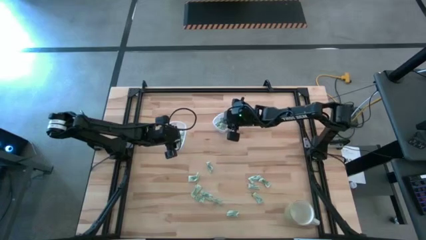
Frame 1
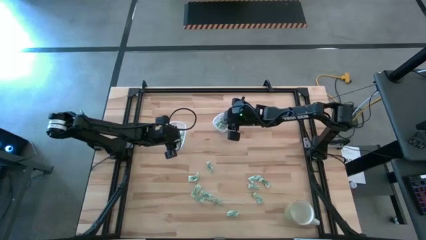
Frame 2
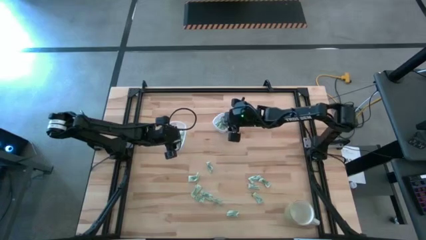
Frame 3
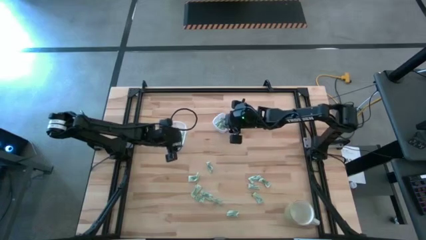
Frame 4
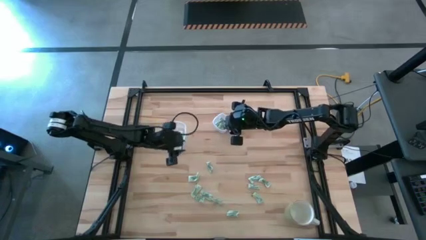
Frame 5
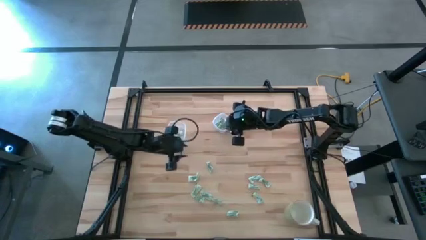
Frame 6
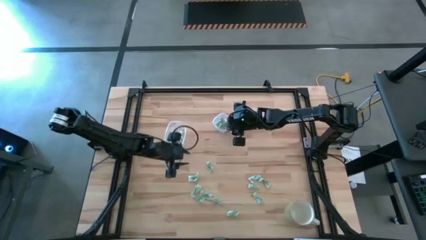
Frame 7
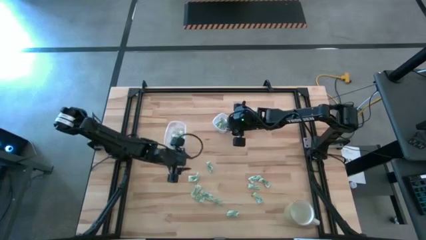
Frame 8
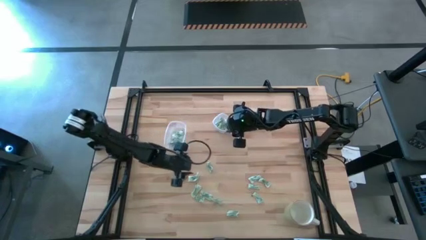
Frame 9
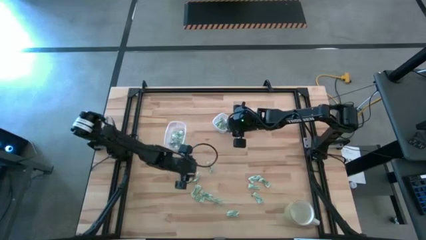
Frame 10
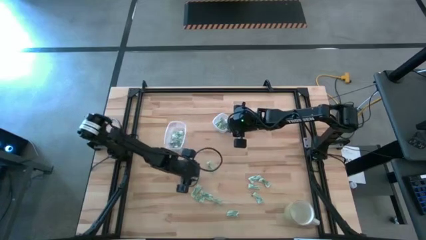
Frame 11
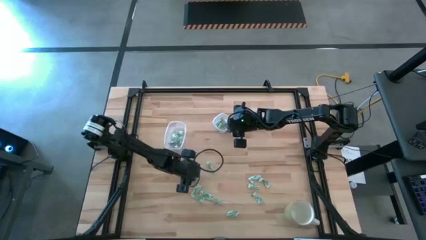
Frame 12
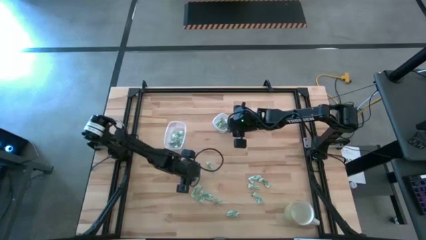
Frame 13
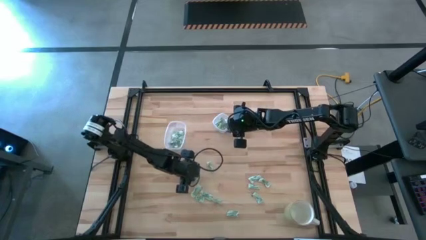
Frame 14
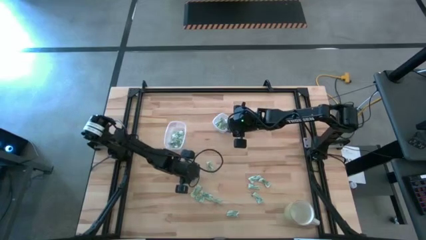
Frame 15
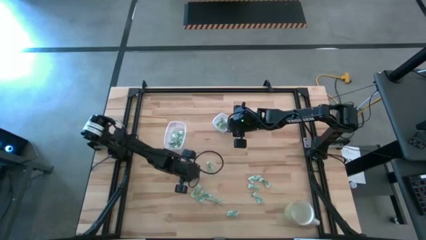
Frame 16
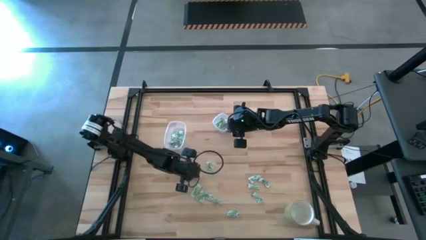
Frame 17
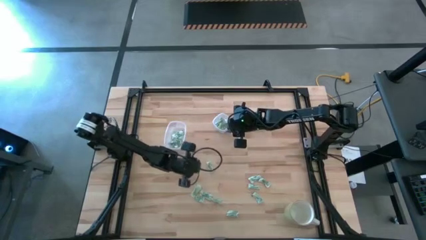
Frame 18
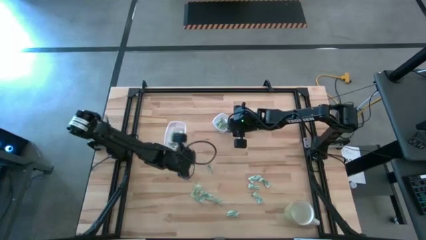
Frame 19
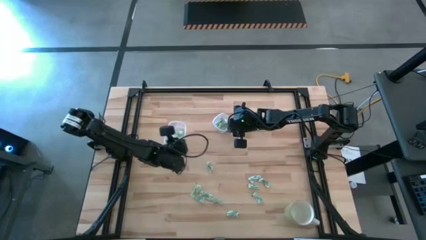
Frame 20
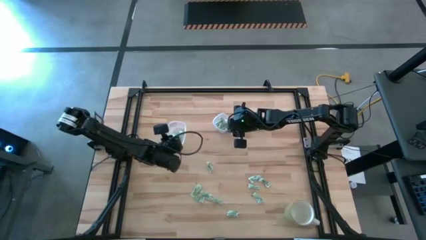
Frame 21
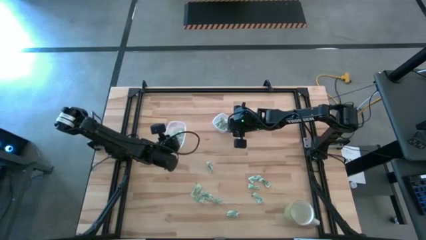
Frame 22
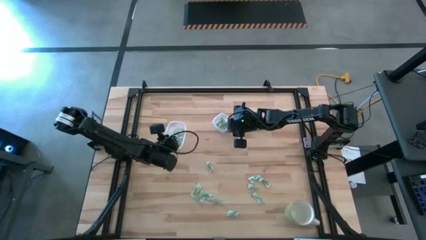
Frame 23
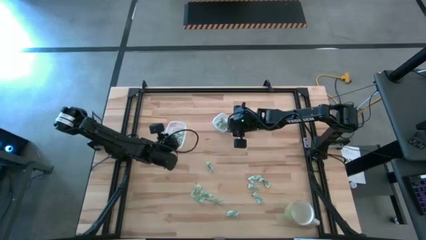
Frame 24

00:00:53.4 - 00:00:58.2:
Task: Pick and place items into bin
Put the stevia packet into the large transparent container

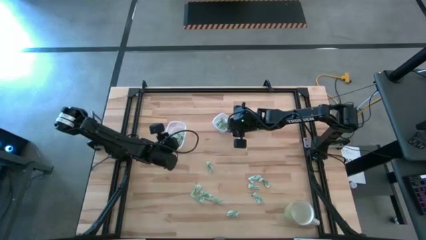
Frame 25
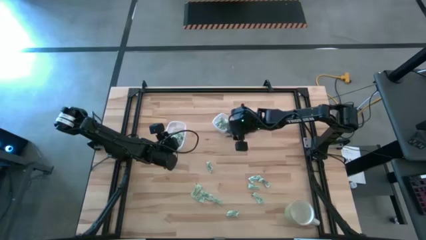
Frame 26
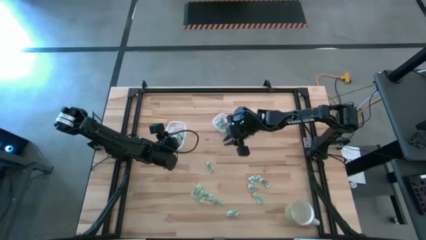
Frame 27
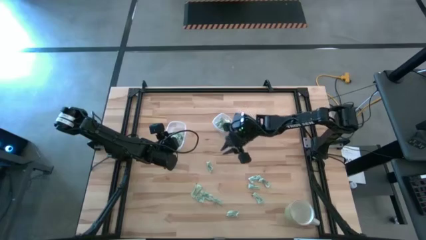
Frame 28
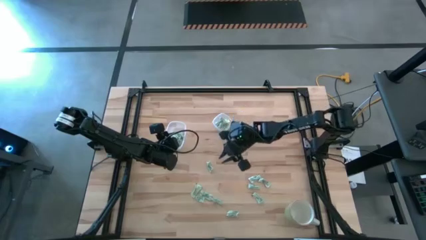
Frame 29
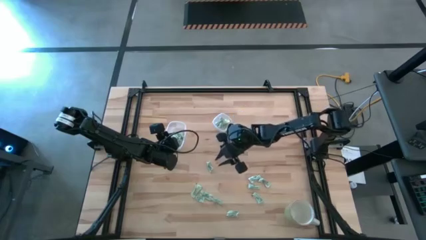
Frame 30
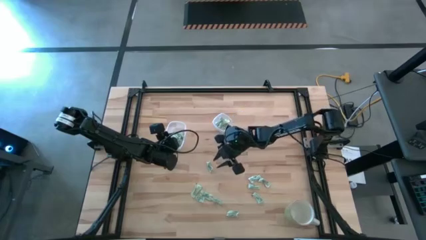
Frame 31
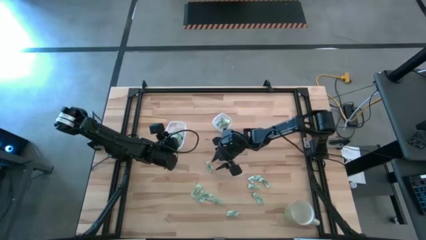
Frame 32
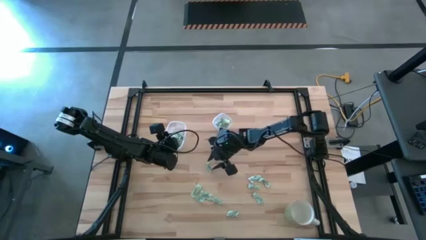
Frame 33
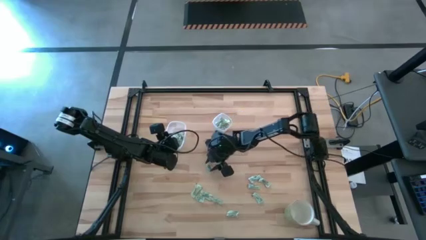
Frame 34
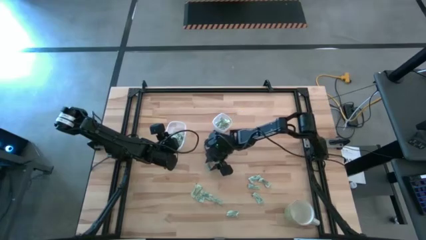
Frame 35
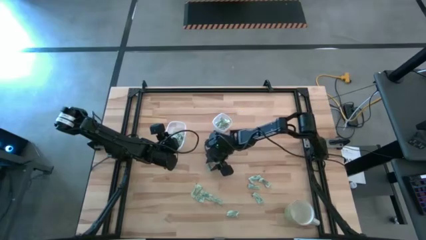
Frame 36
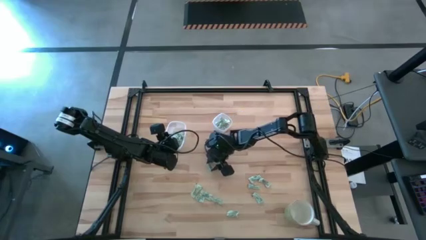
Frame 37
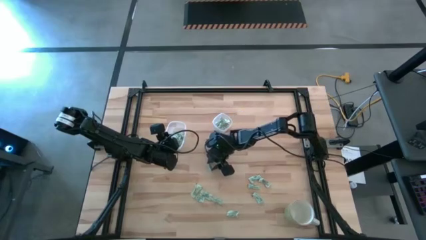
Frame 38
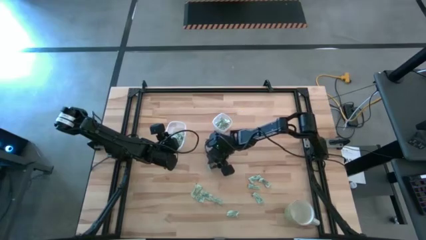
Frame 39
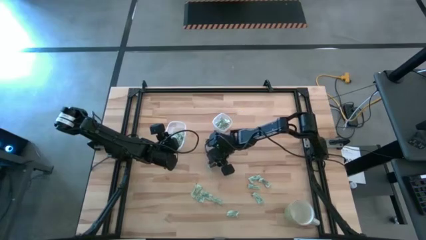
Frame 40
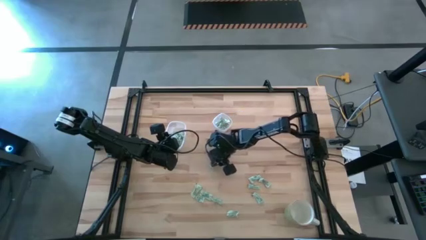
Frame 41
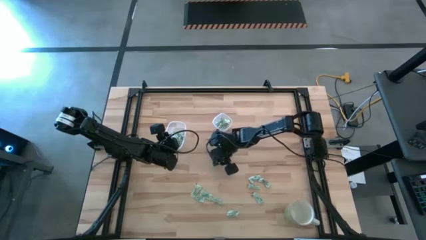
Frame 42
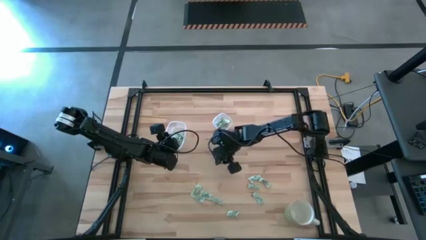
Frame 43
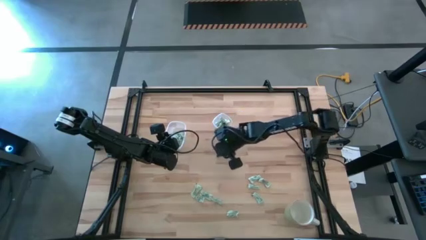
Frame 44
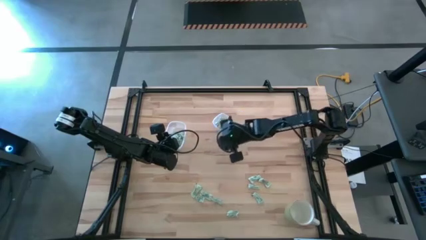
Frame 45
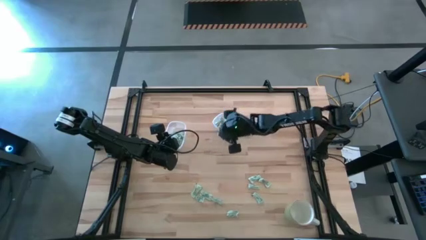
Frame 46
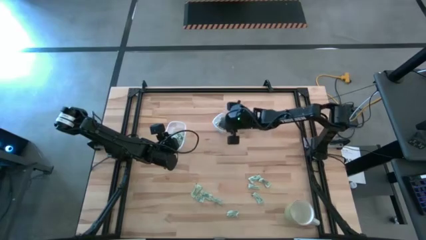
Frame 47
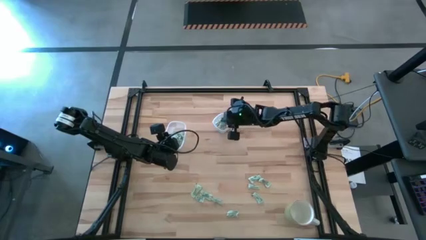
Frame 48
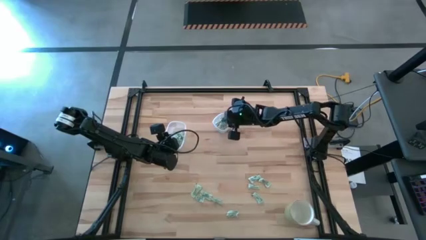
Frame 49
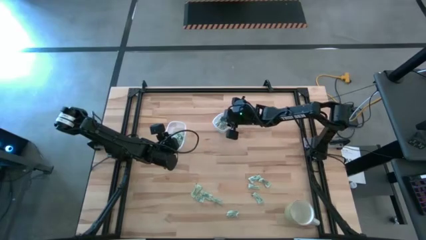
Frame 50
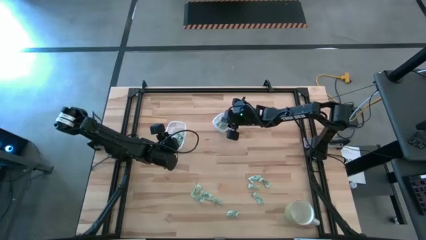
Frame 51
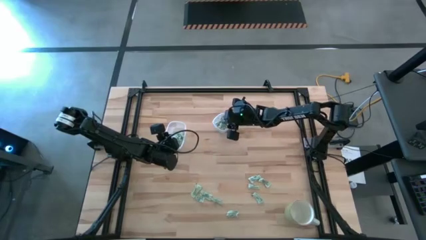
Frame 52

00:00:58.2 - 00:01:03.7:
Put the stevia packet into the small transparent container

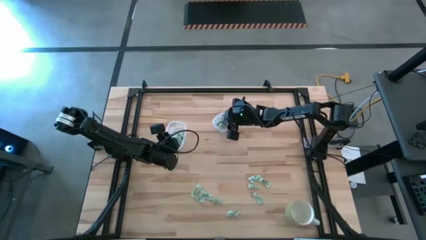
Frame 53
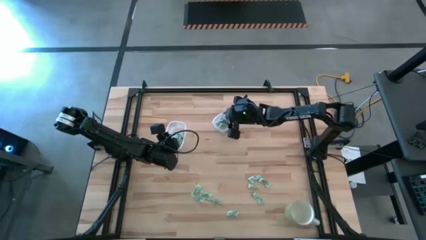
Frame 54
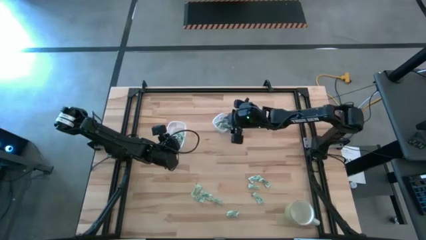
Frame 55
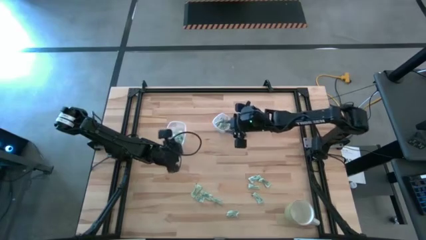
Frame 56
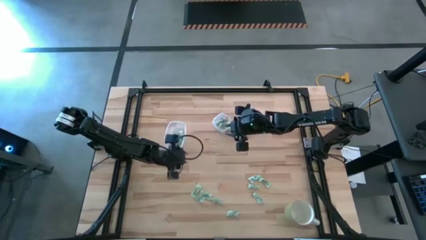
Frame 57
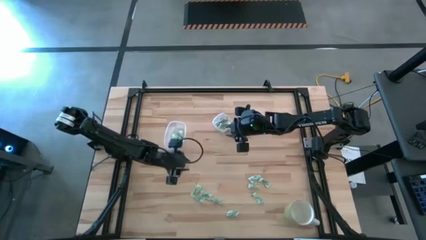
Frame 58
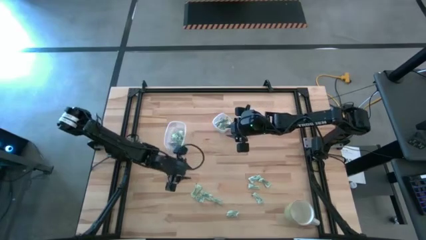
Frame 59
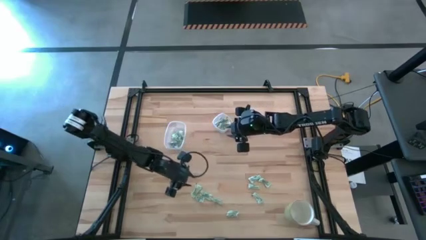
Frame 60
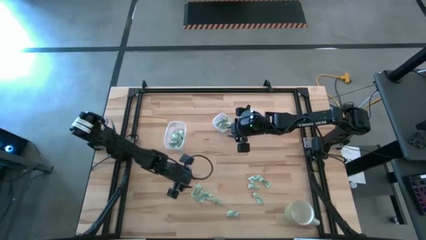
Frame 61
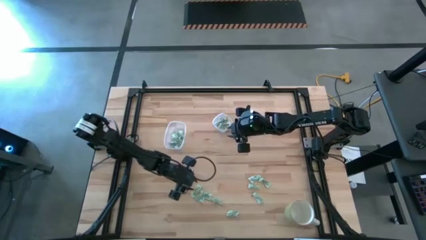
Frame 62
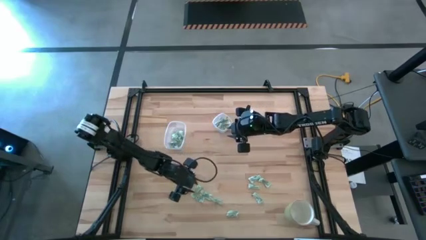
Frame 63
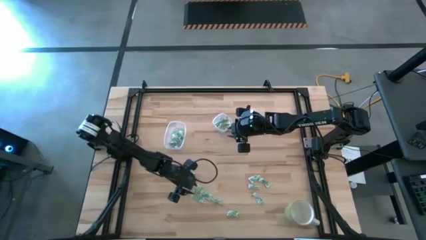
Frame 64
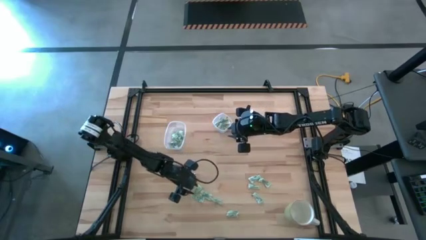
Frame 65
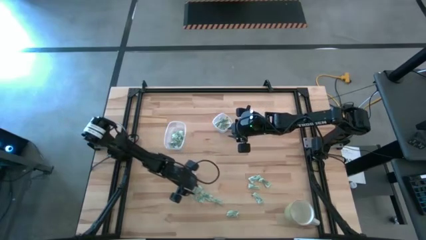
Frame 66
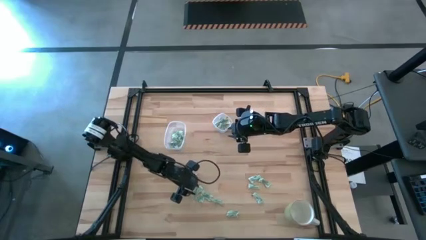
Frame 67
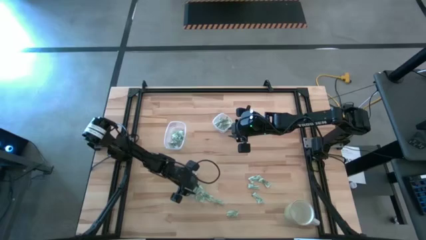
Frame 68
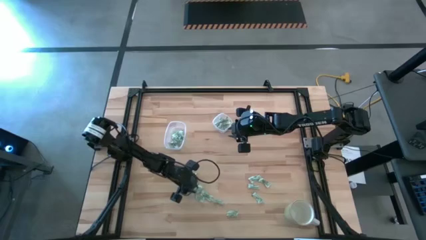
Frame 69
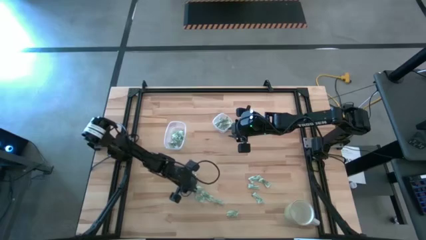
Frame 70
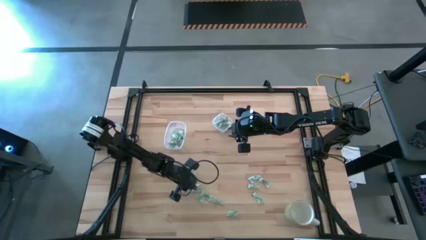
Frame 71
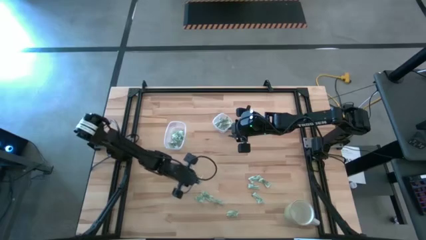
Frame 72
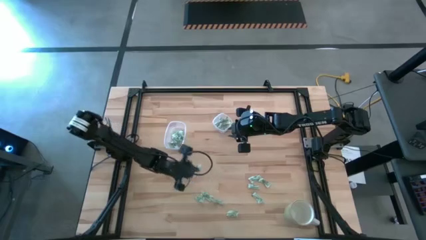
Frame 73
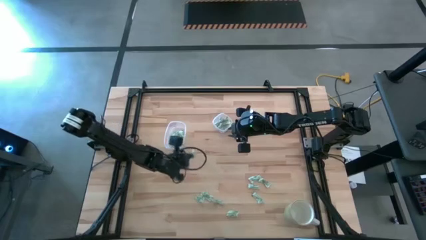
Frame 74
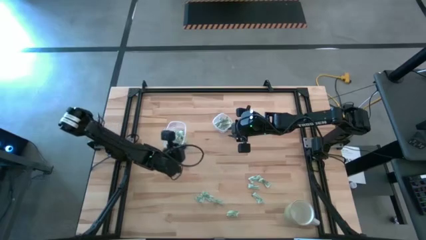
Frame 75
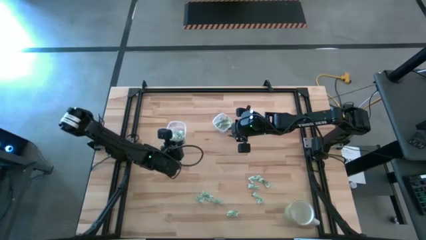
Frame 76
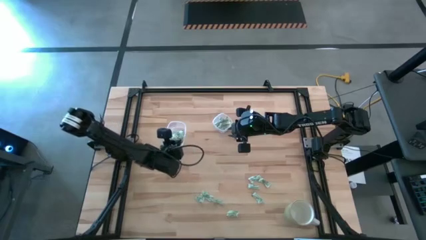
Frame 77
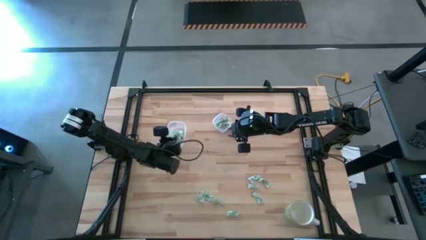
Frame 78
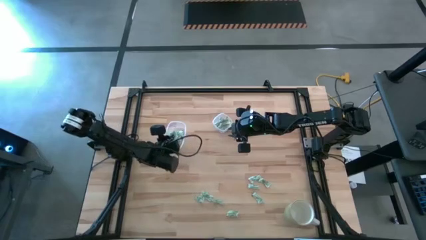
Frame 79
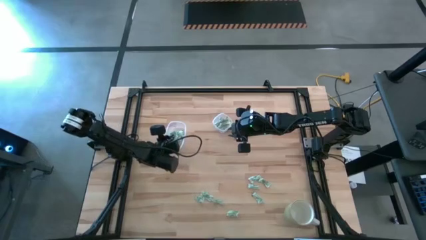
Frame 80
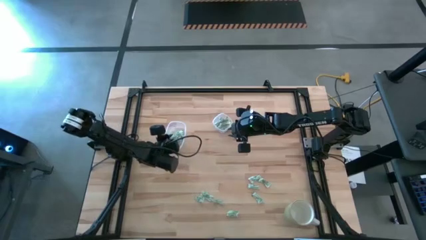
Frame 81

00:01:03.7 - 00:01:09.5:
Put the stevia packet into the large transparent container
